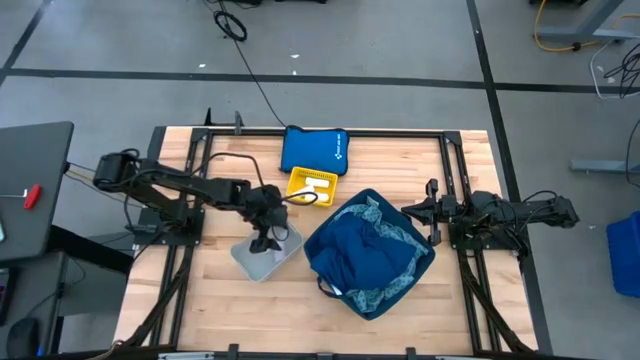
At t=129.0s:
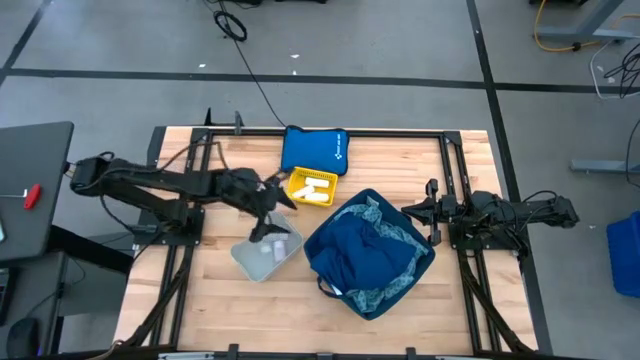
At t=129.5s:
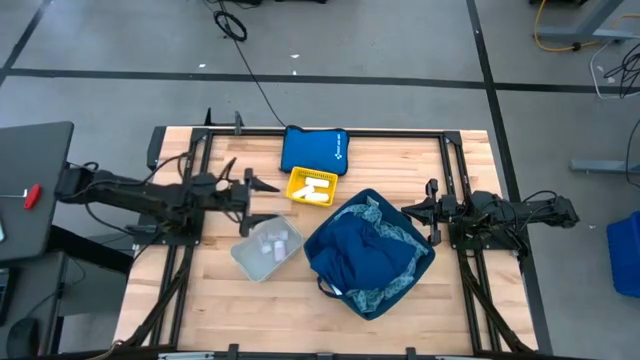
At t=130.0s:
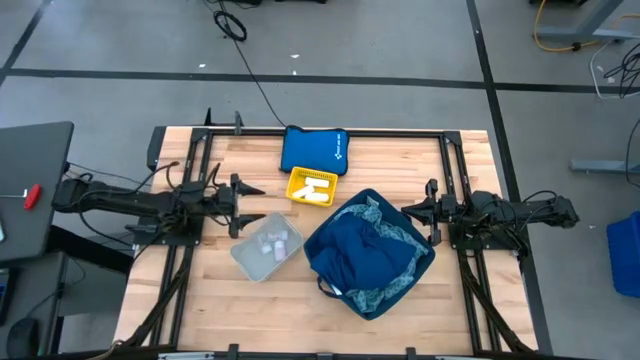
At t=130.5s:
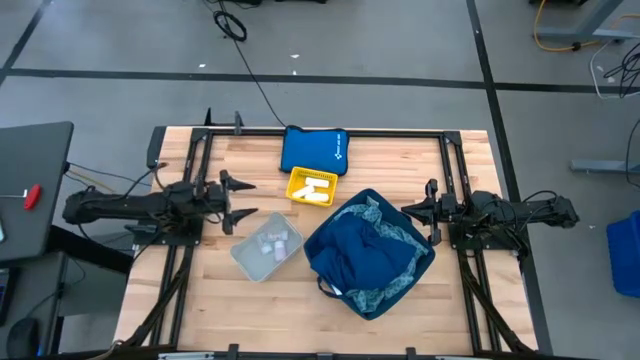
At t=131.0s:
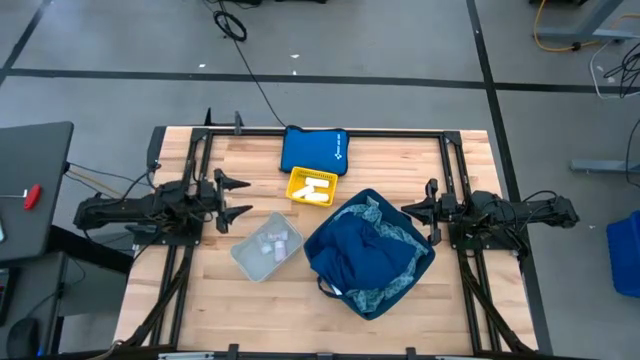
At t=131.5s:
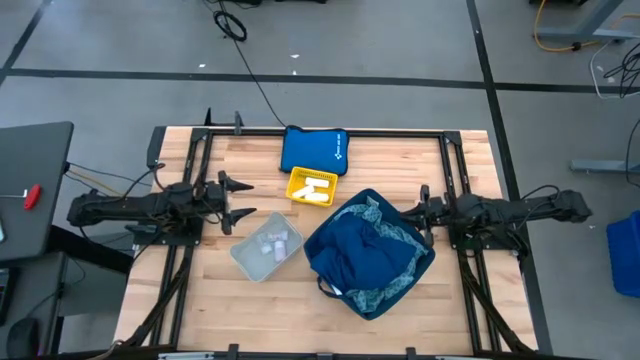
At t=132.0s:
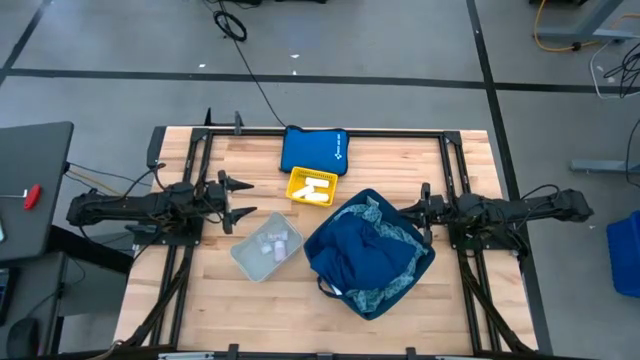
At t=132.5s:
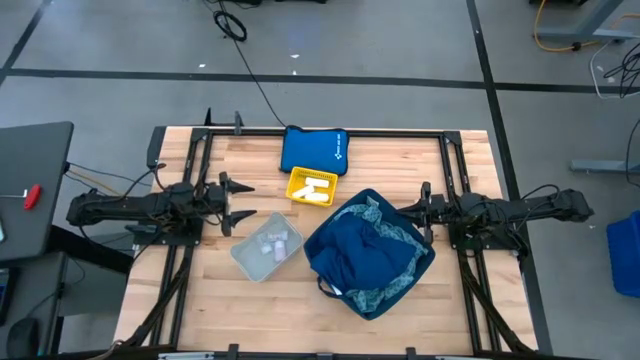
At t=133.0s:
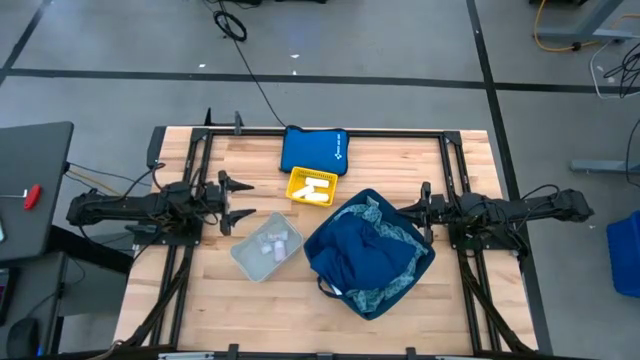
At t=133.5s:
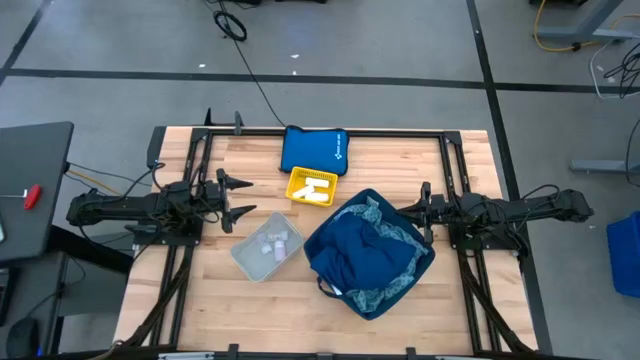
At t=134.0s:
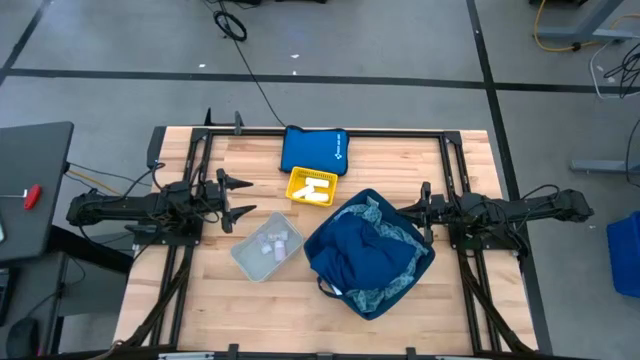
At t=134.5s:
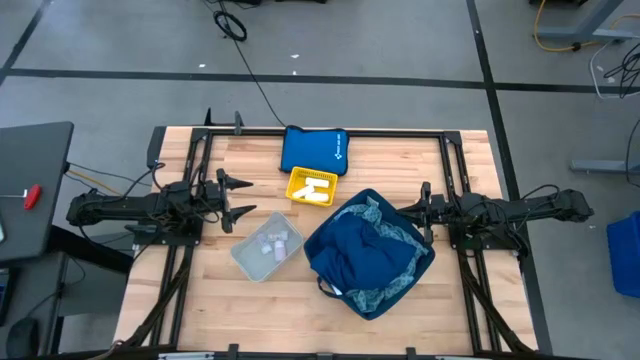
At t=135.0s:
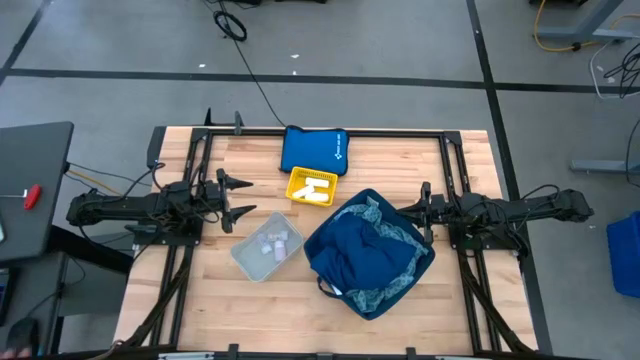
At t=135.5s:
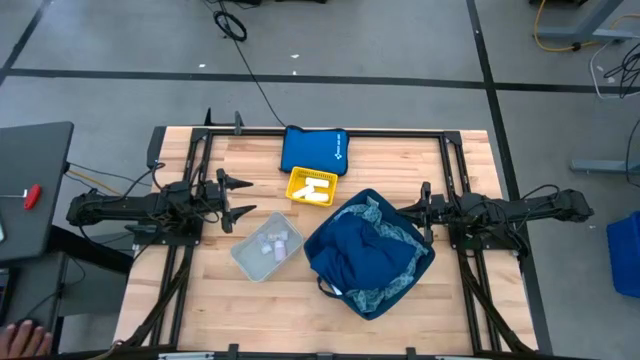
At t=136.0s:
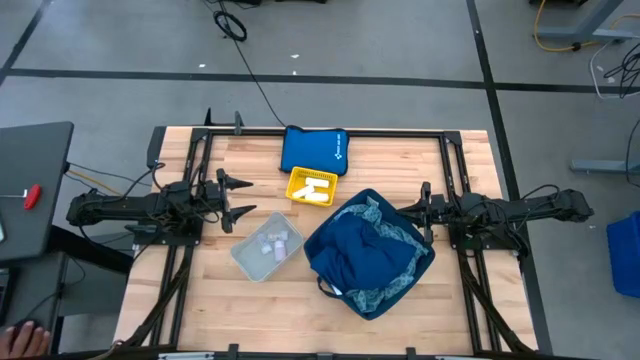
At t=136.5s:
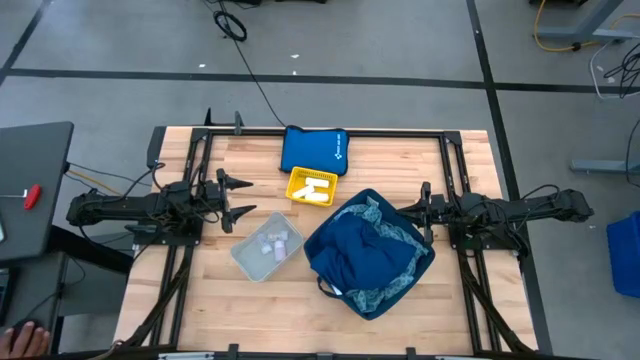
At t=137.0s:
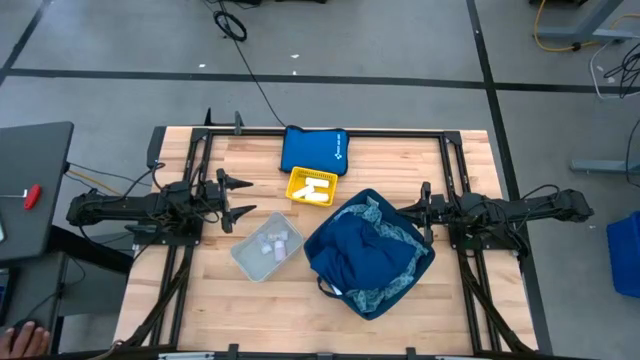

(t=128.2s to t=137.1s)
Task: Pick & place medical supplies in basket/bin
Return to Home Position

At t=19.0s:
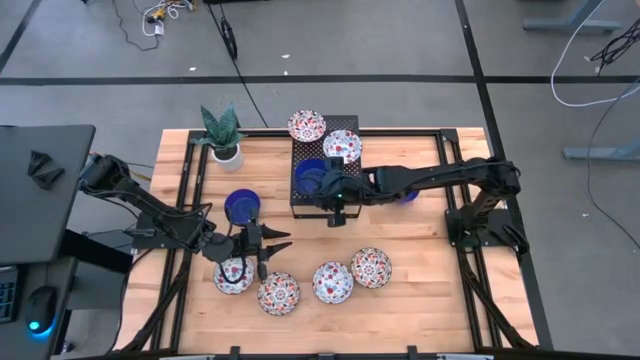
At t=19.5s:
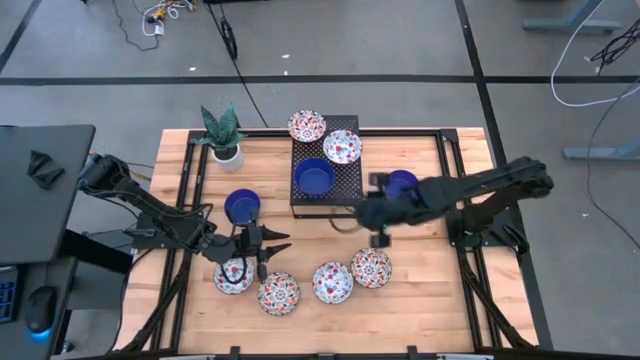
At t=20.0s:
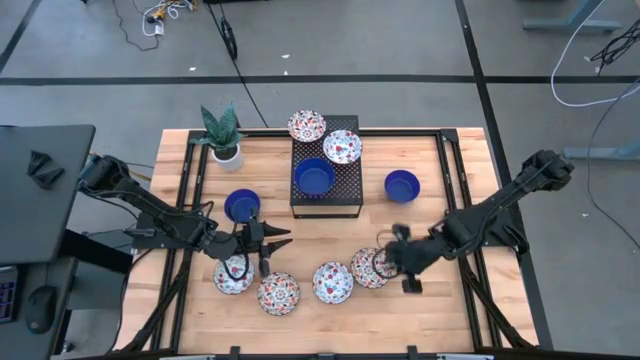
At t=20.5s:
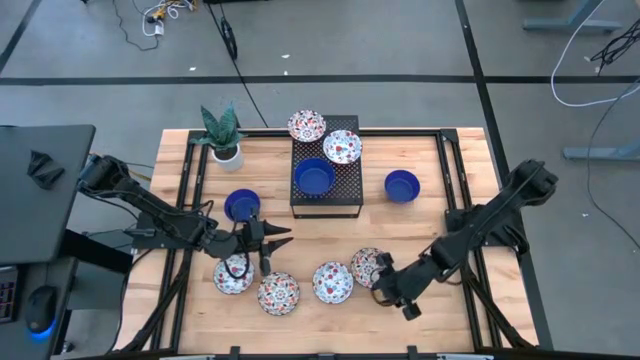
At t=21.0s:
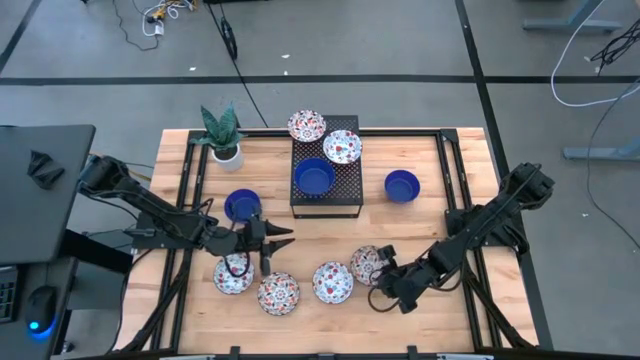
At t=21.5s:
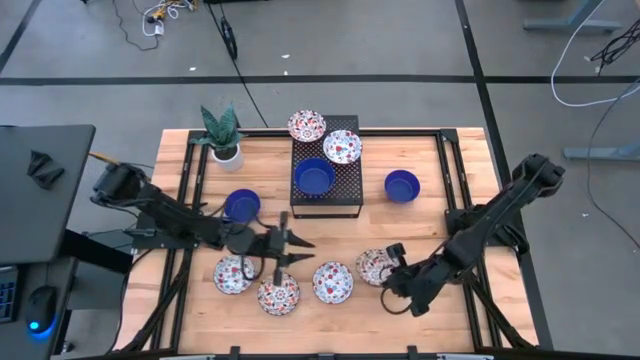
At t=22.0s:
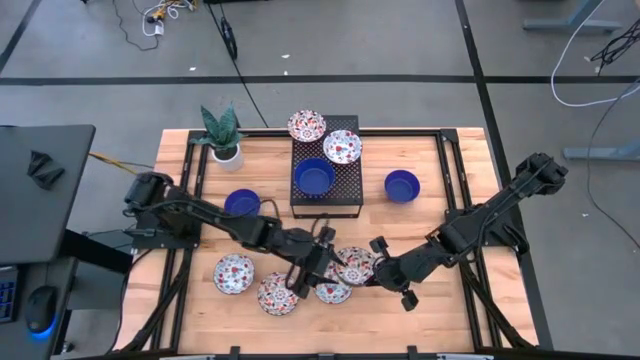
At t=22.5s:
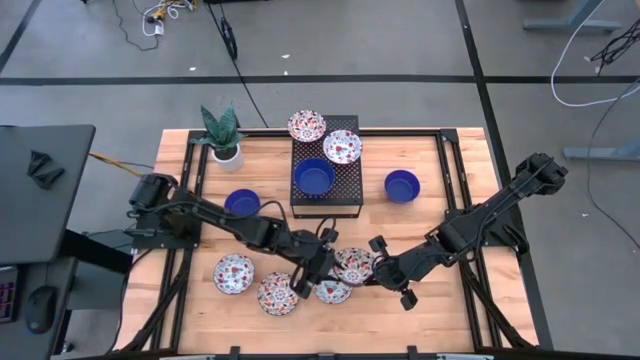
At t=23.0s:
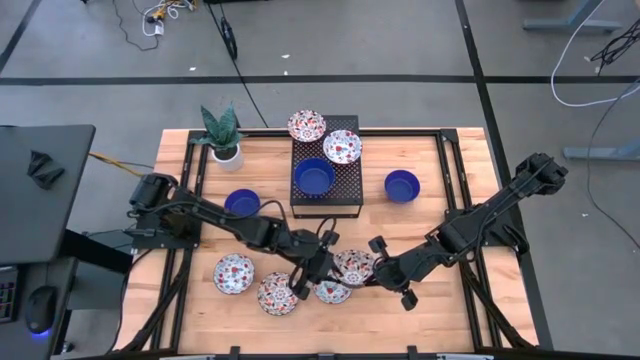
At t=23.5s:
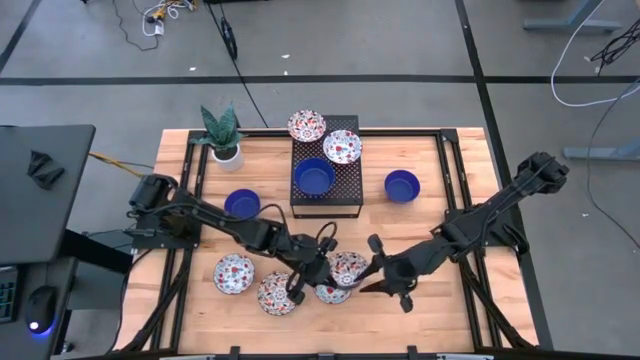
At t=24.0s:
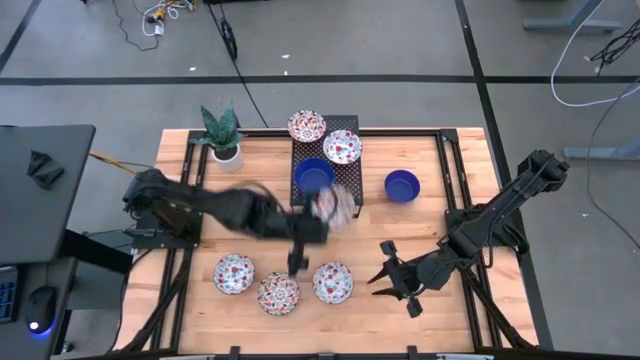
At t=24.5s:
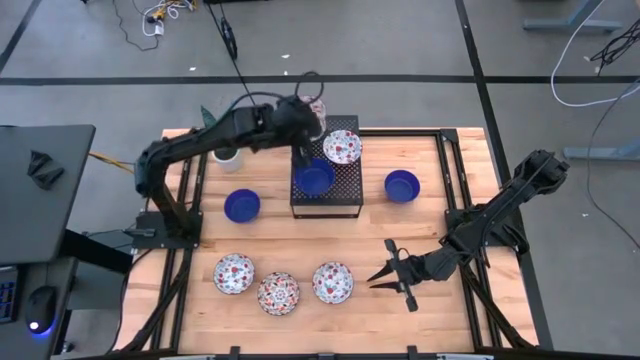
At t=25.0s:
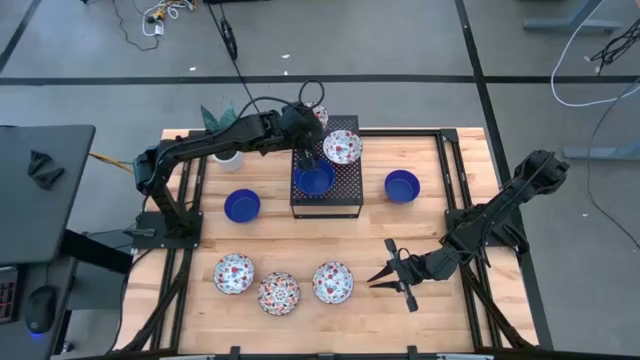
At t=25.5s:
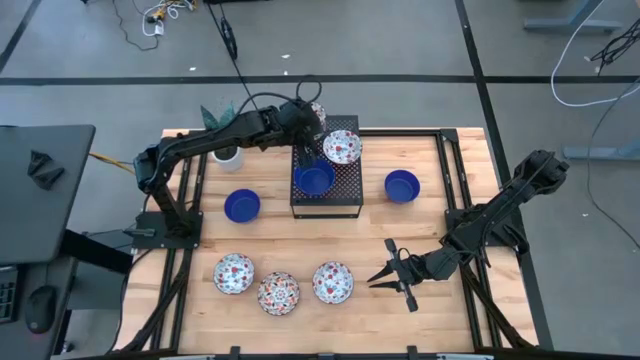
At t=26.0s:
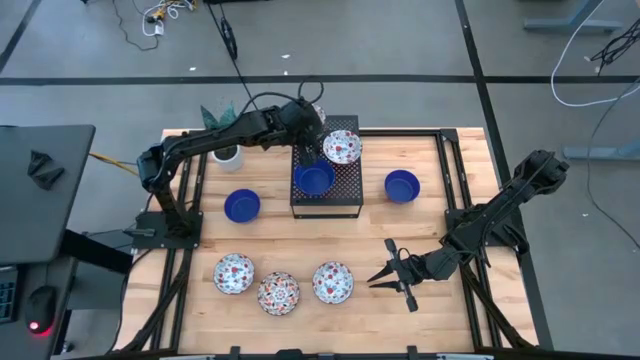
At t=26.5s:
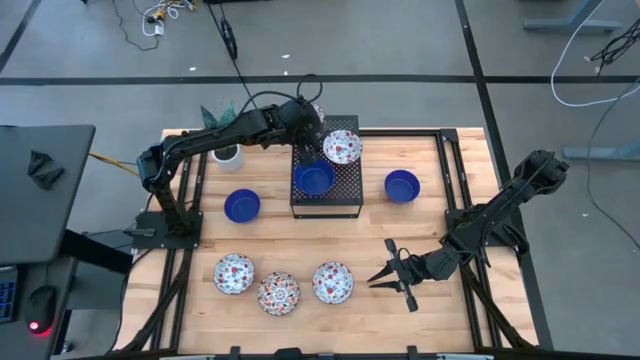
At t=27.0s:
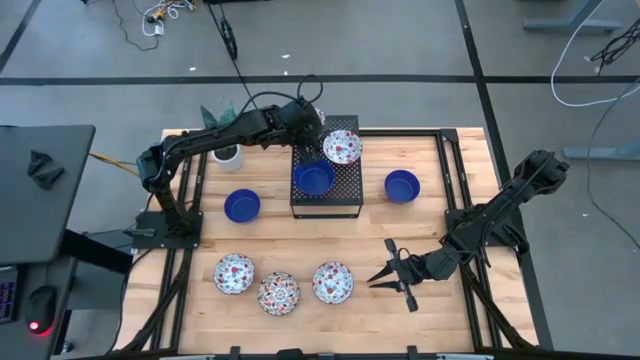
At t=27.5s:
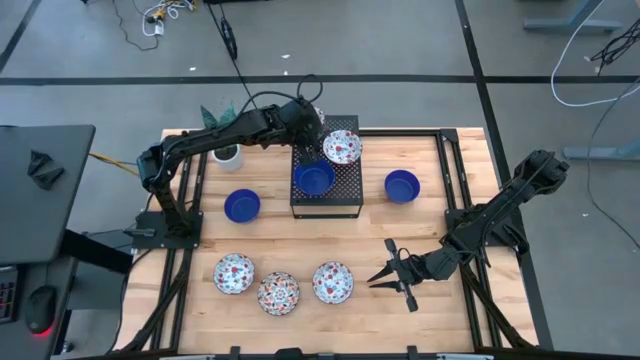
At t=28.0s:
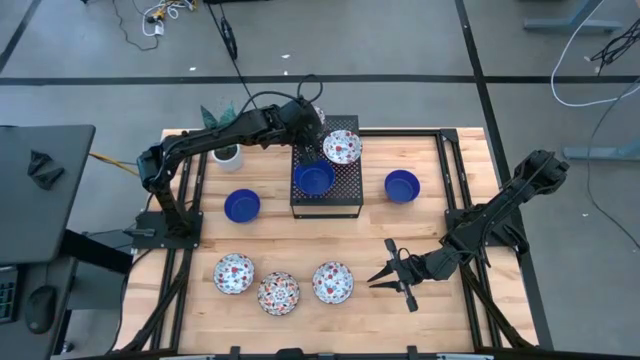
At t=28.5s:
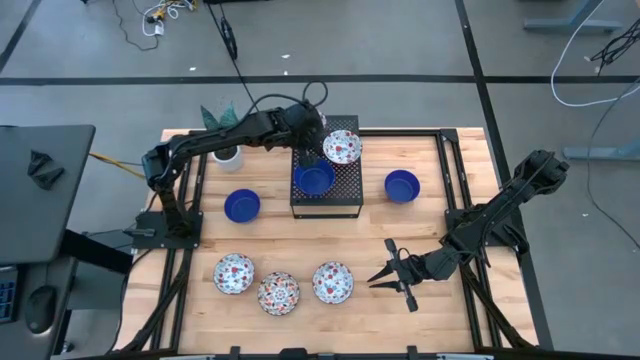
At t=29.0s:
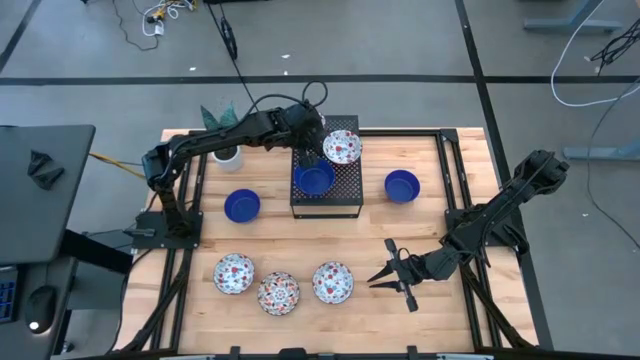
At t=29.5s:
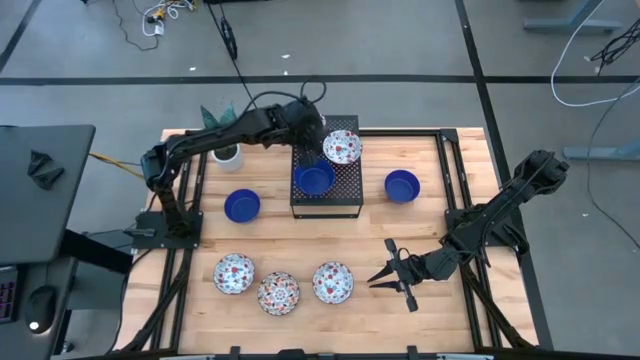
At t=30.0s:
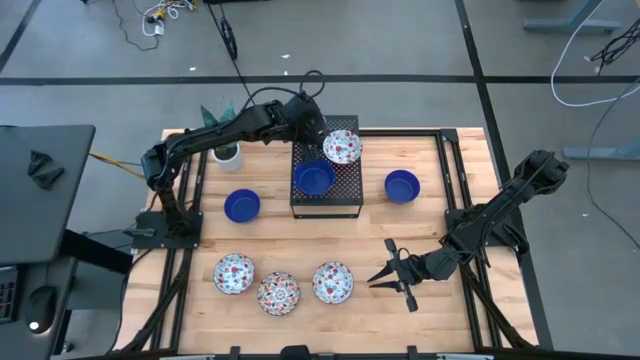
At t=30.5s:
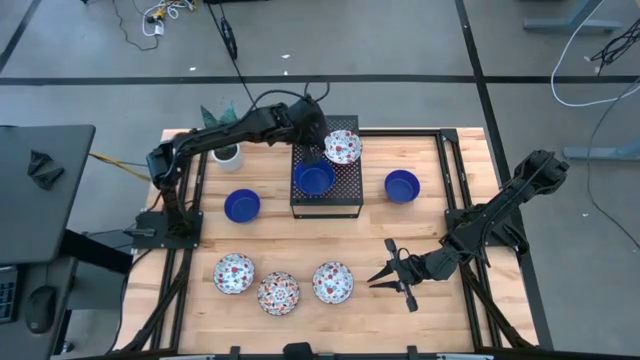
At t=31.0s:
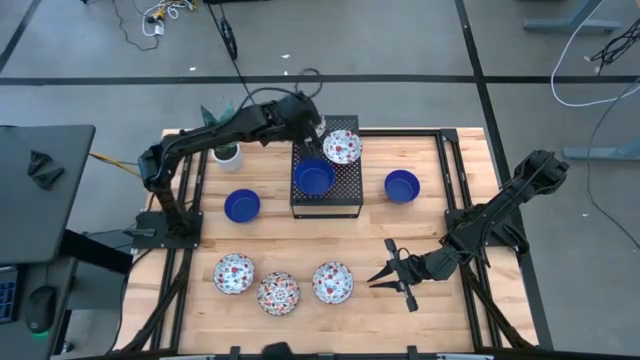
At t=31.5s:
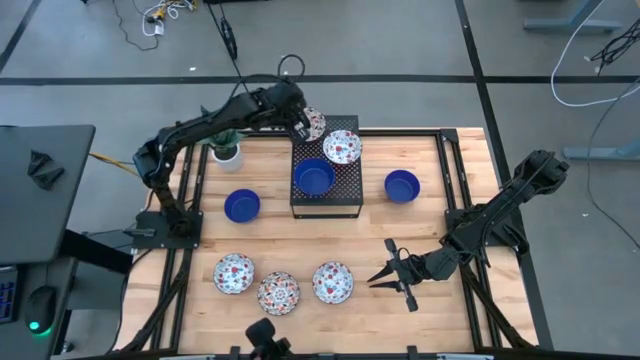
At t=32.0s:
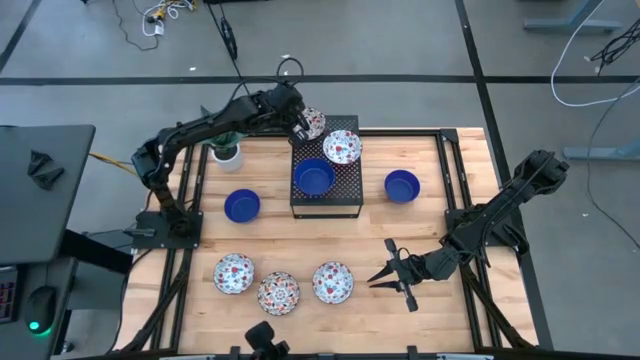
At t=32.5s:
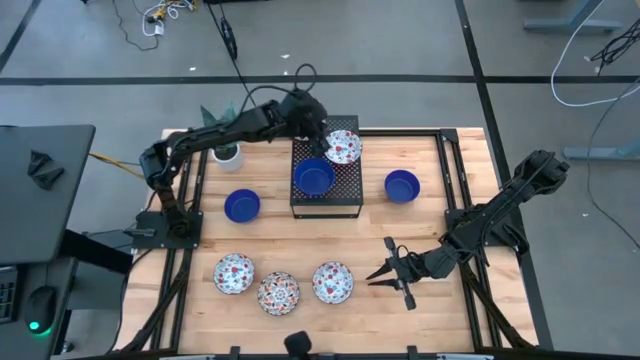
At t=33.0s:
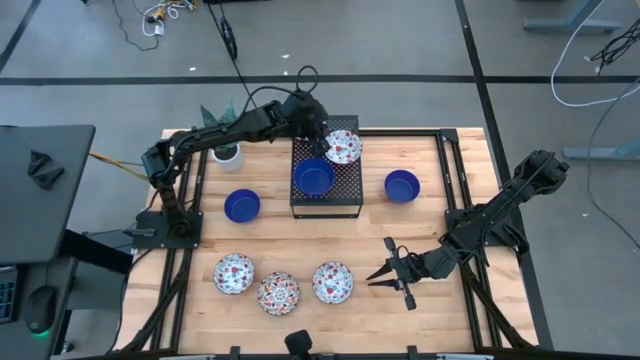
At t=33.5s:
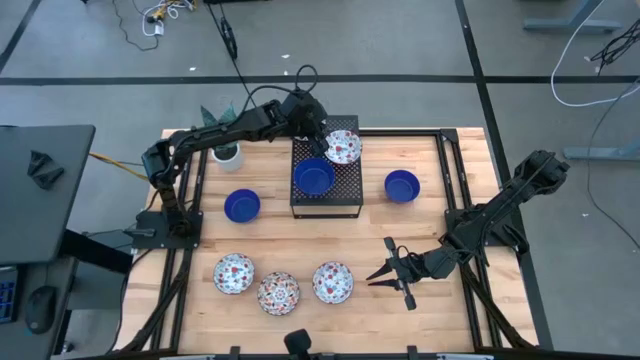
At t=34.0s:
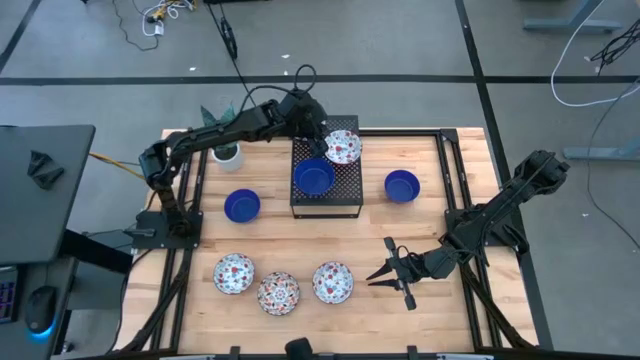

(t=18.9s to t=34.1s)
Task: Pick & Place Mini bowls
Stack the right orange patterned bowl on top of the other orange patterned bowl on the shelf
